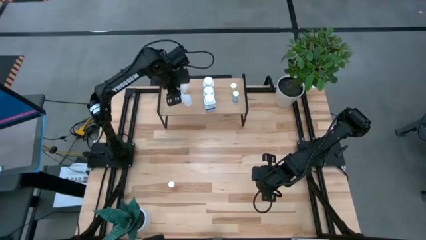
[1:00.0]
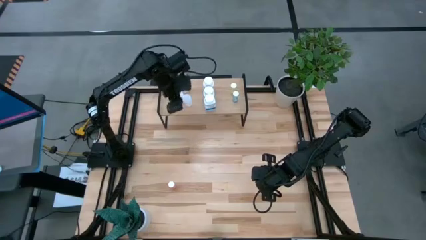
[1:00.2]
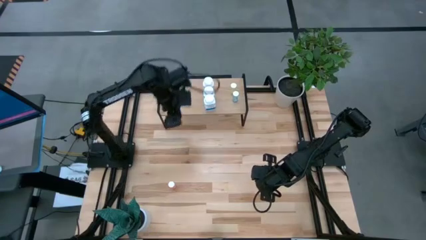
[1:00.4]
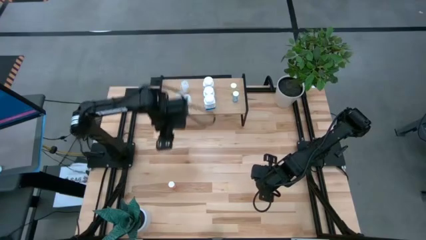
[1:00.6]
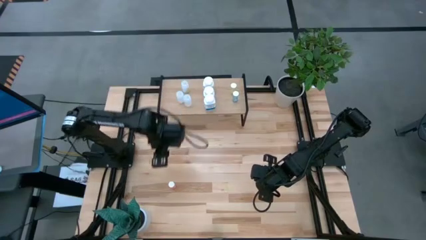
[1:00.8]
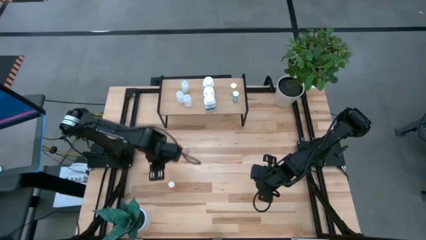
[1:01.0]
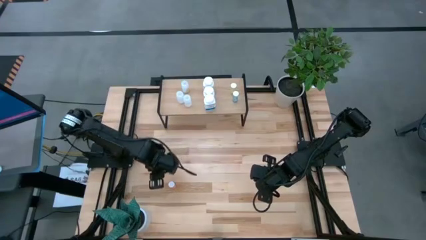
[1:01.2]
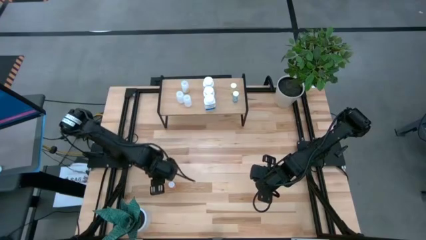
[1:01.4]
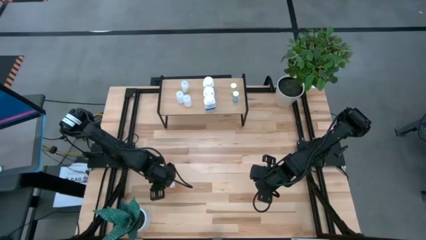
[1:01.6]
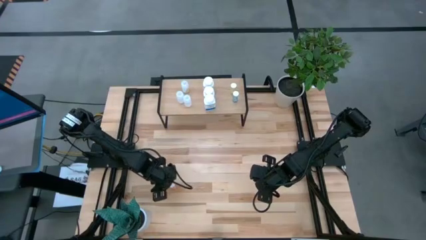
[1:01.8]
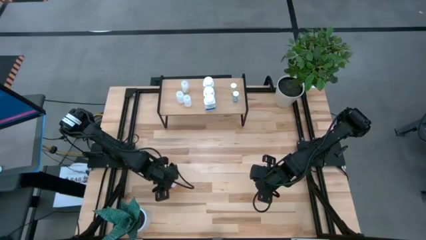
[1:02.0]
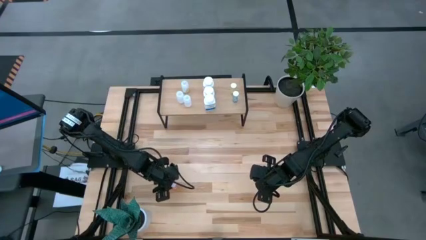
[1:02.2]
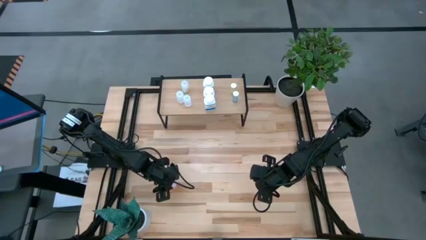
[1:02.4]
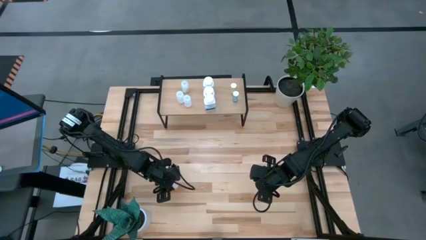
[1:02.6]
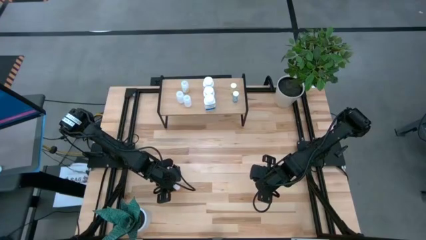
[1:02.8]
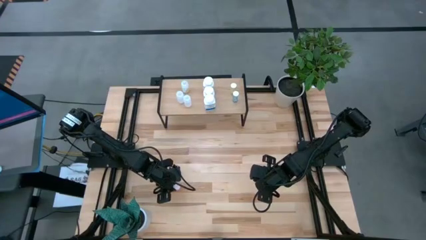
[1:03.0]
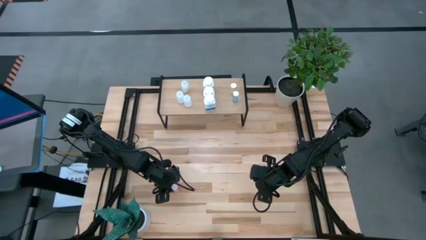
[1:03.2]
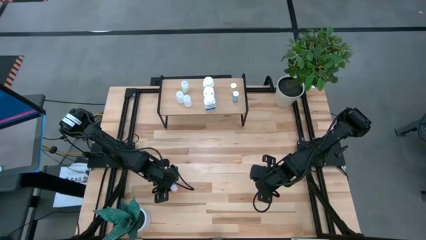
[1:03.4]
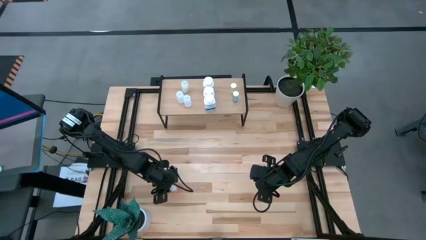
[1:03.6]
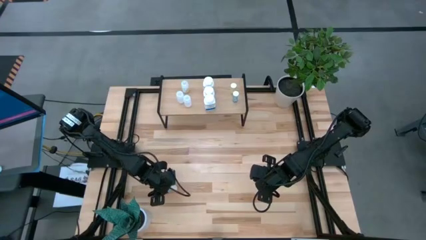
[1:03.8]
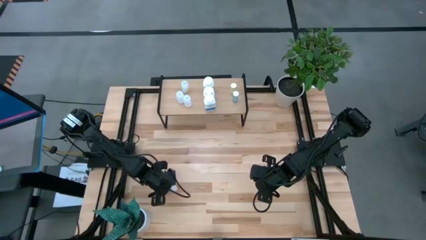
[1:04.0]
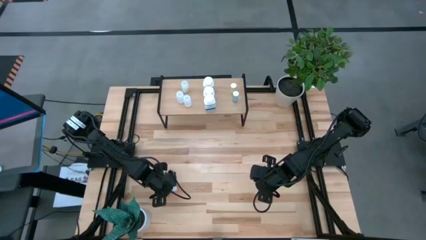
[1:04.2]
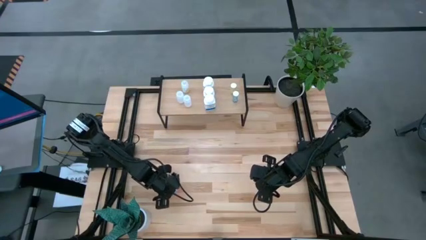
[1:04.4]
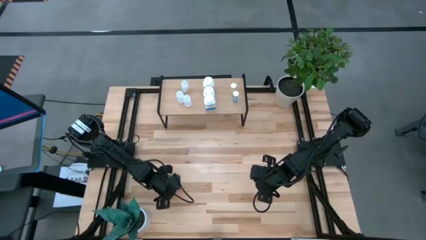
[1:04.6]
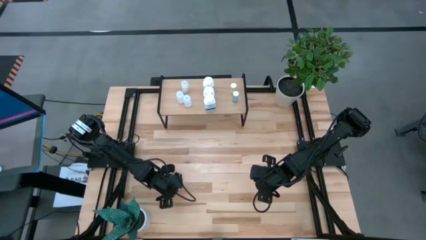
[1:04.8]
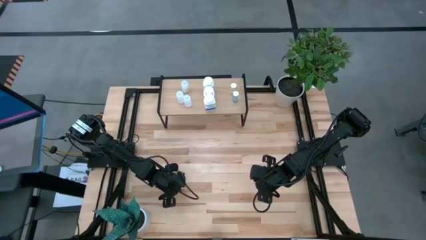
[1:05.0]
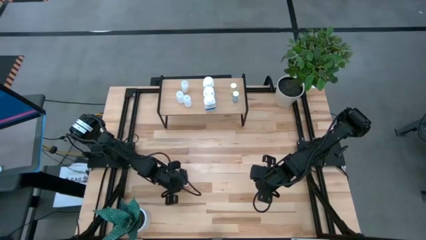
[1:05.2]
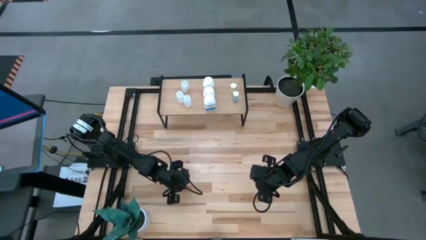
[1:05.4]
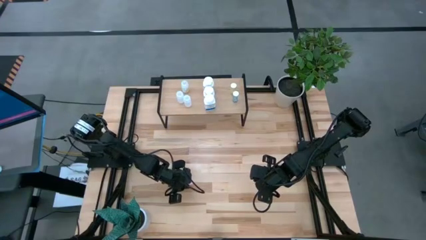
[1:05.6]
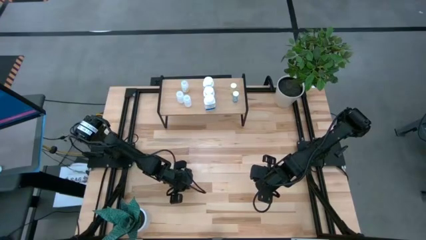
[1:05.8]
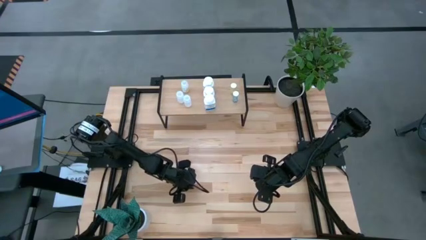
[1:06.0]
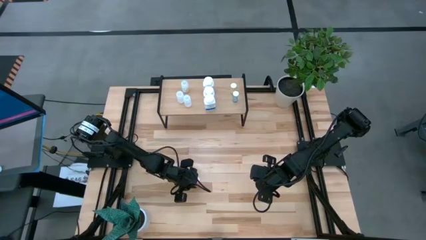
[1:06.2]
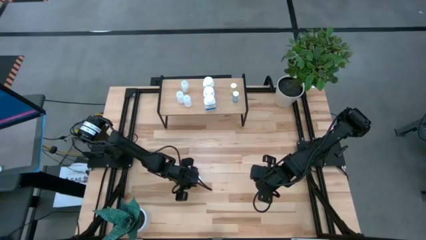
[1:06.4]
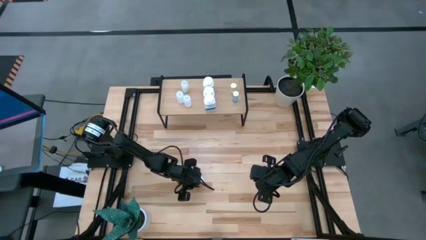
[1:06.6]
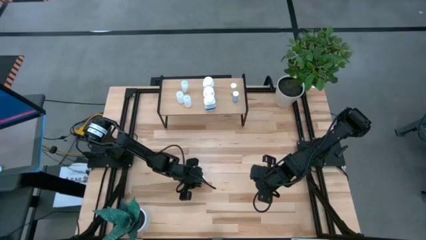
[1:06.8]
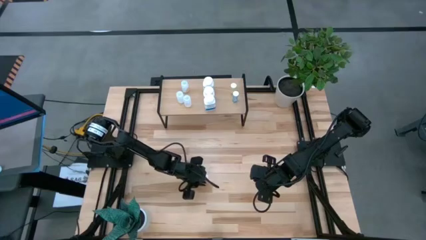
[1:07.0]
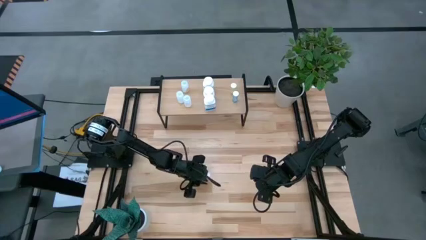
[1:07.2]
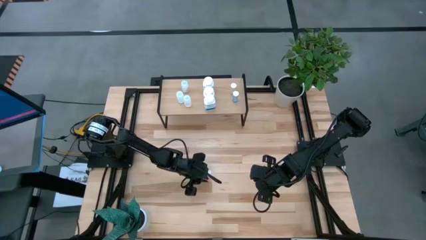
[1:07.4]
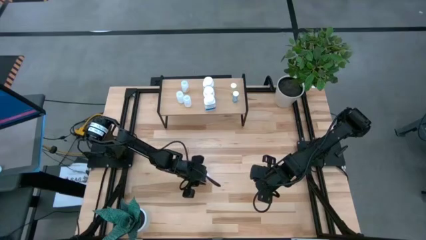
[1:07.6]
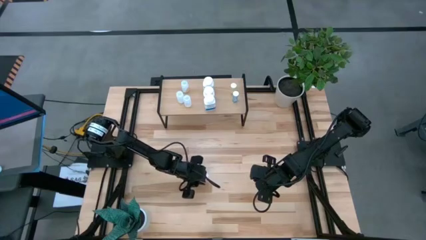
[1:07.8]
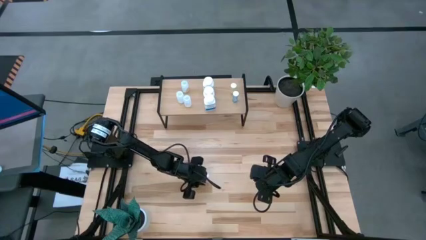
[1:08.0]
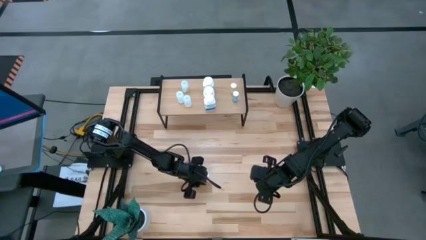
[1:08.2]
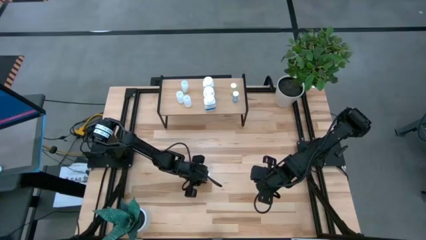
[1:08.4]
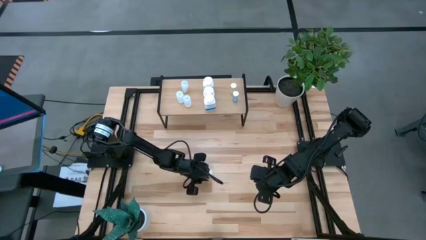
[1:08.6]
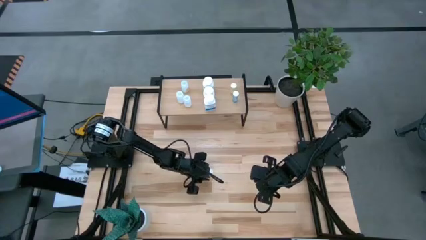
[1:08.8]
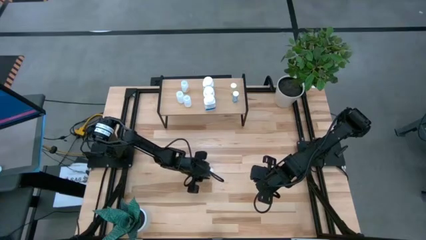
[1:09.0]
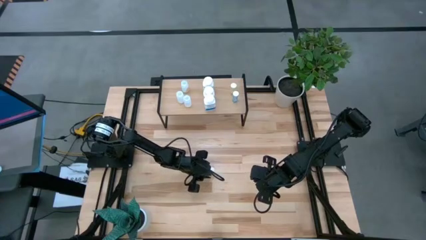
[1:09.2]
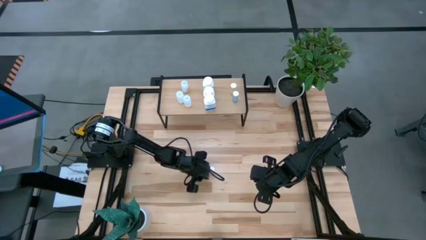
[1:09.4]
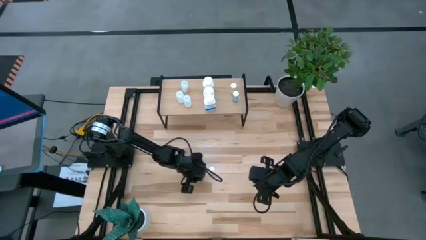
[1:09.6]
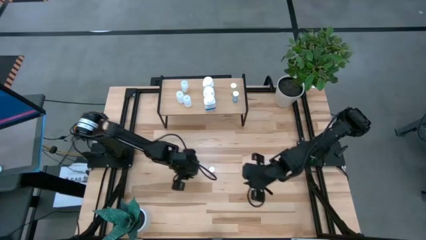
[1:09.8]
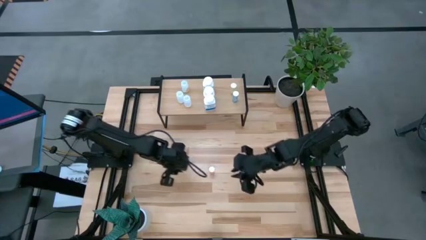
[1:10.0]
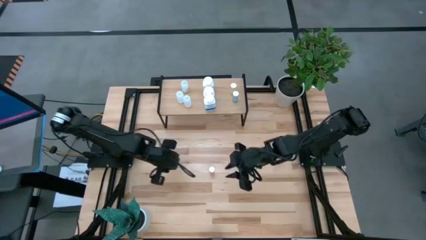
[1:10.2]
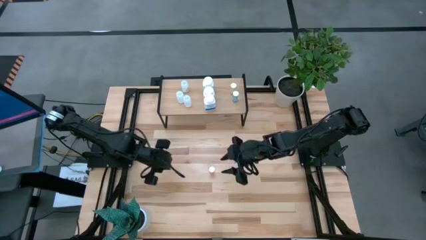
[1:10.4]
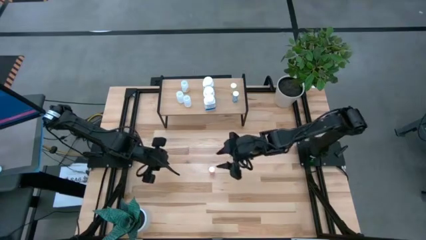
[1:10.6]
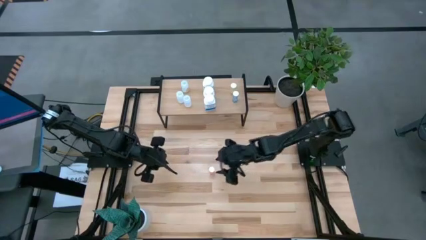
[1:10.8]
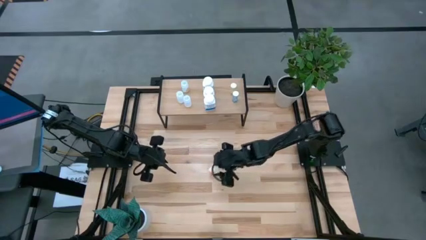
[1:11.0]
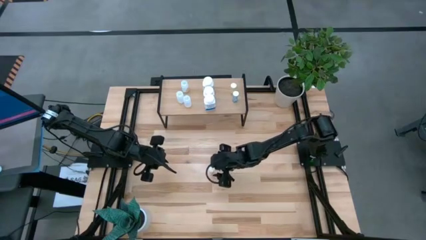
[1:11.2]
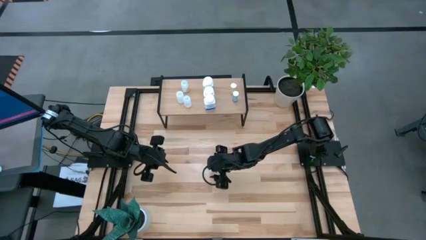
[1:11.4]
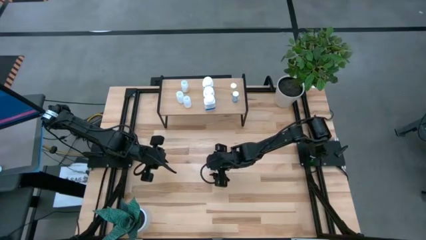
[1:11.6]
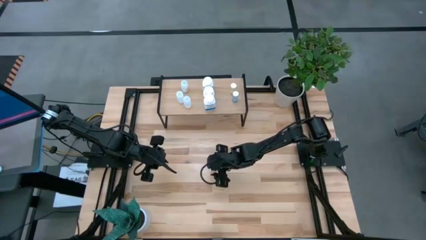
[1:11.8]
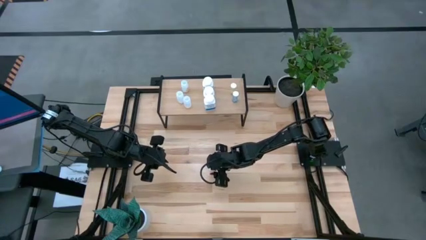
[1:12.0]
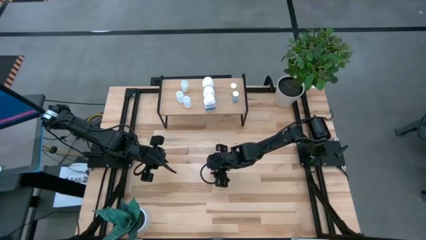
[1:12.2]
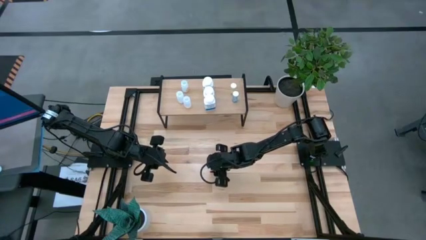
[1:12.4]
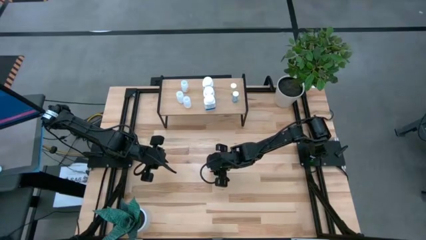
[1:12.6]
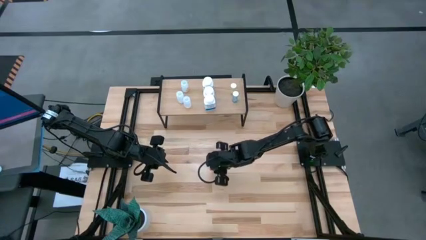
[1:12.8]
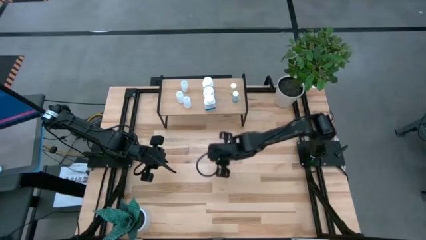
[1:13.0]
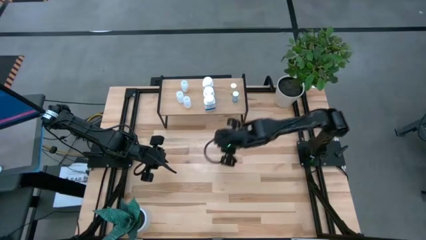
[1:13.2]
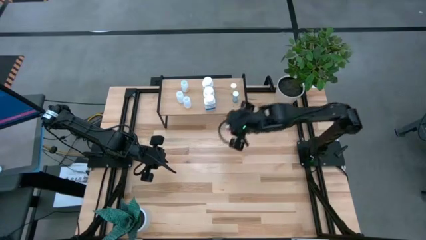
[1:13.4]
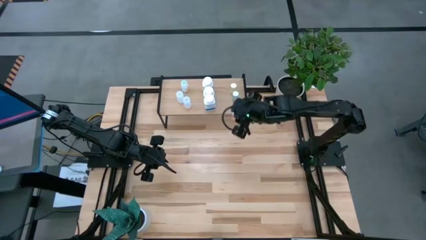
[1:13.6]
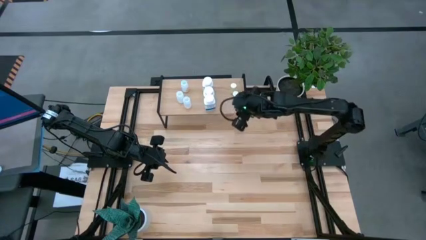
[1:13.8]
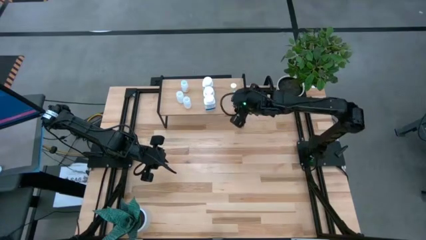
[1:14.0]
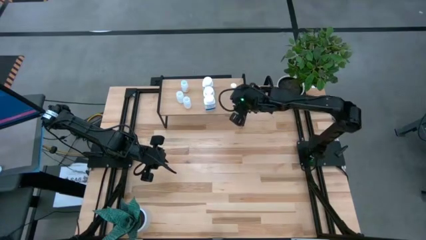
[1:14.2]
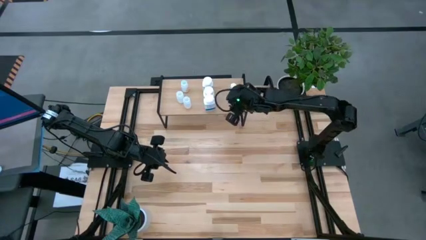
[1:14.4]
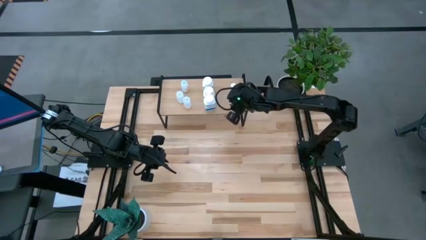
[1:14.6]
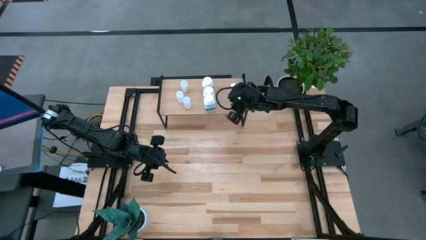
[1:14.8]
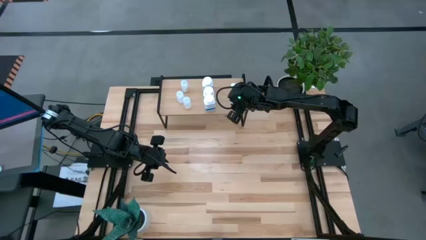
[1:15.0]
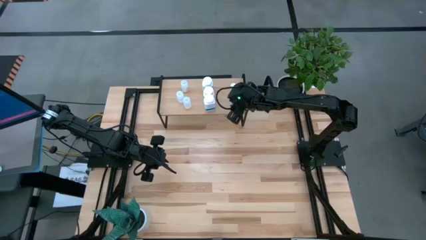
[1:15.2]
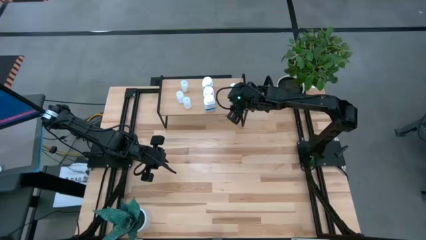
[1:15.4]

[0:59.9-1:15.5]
Task: Pick and place medicine bottles onto shelf by color
Put the orange pill bottle on the shelf
